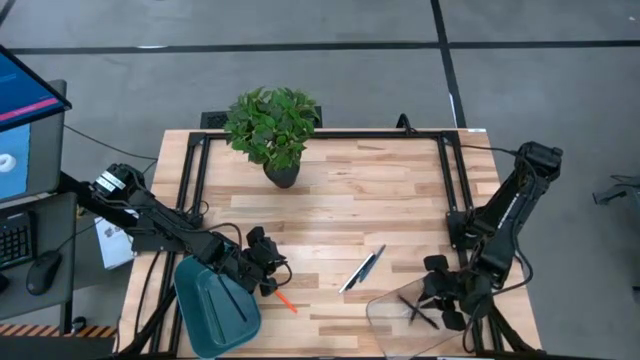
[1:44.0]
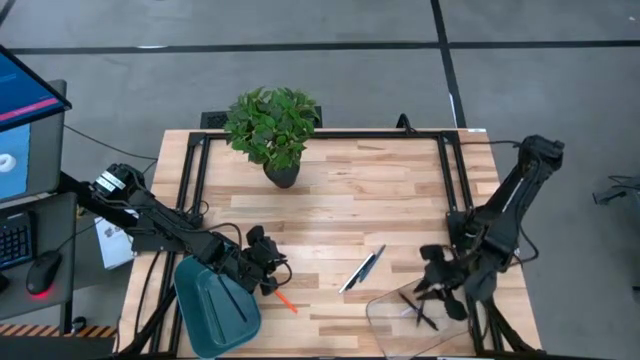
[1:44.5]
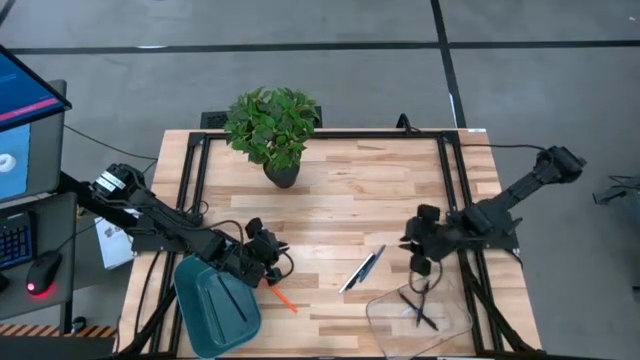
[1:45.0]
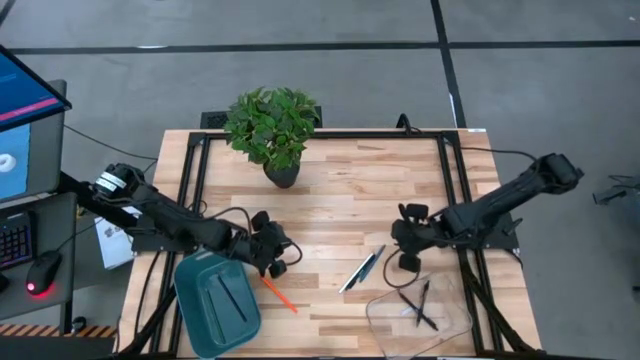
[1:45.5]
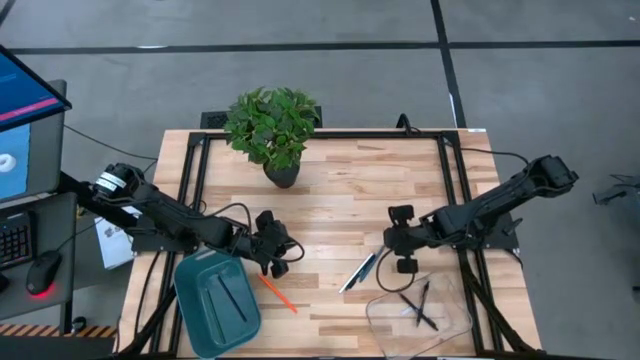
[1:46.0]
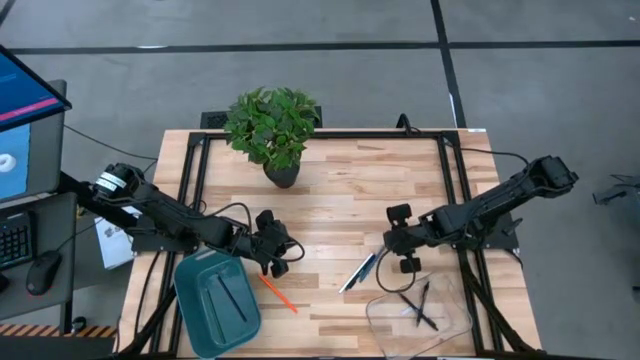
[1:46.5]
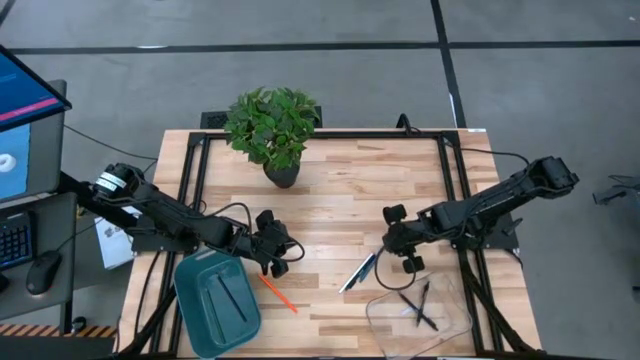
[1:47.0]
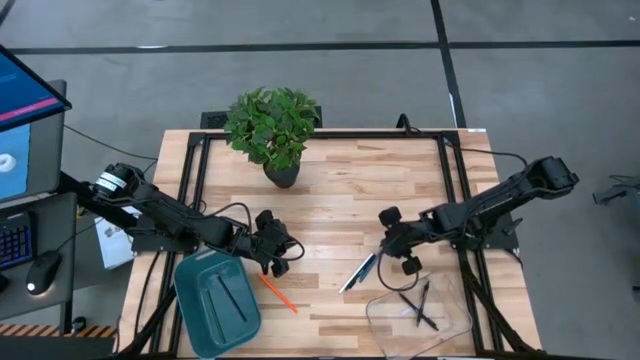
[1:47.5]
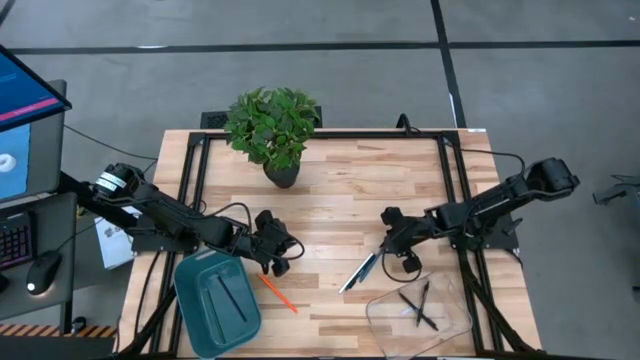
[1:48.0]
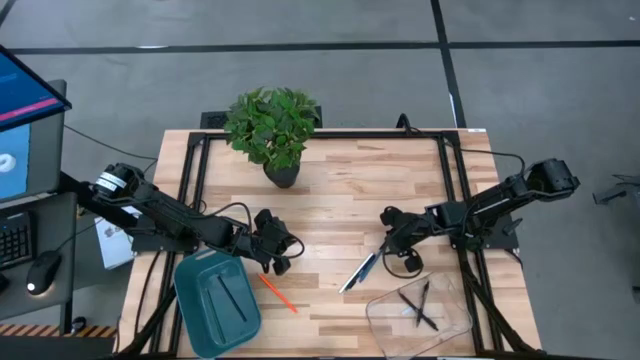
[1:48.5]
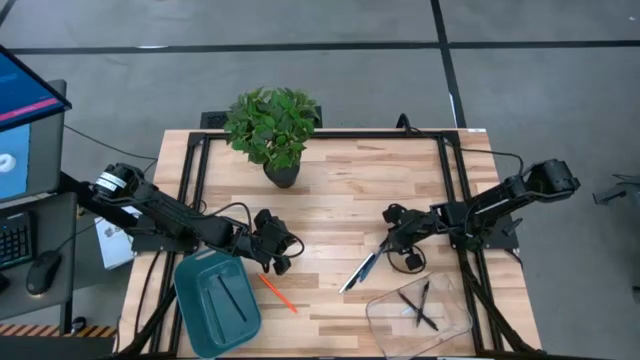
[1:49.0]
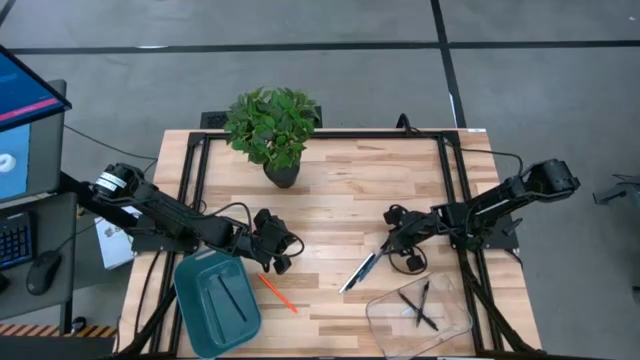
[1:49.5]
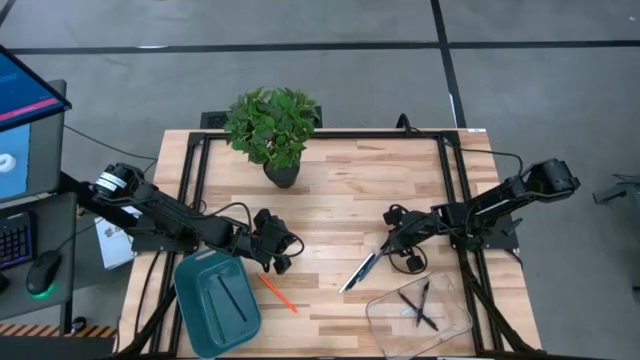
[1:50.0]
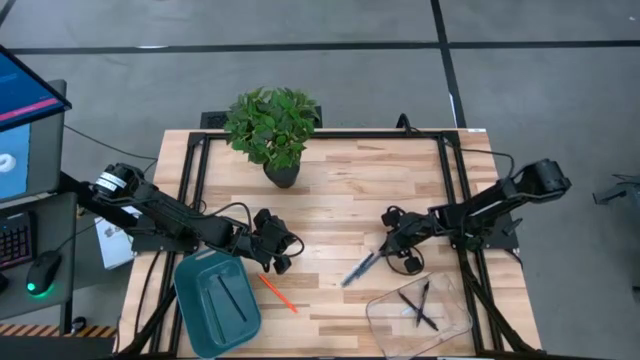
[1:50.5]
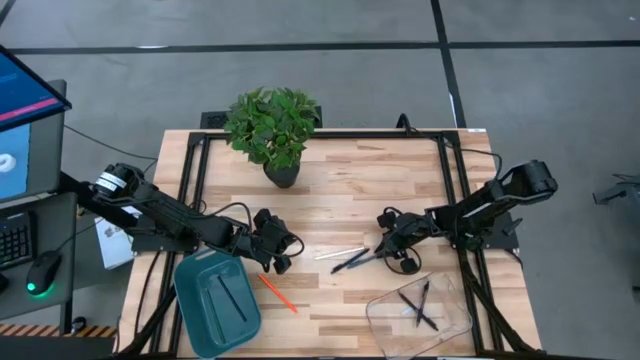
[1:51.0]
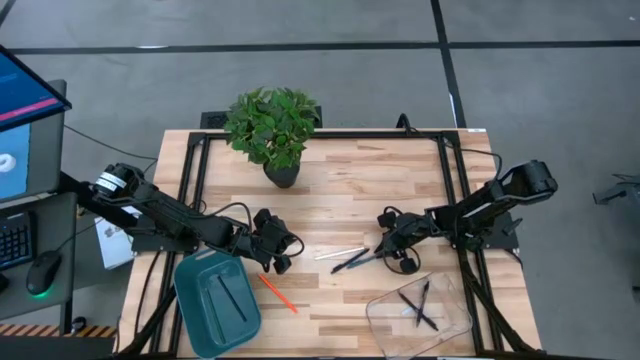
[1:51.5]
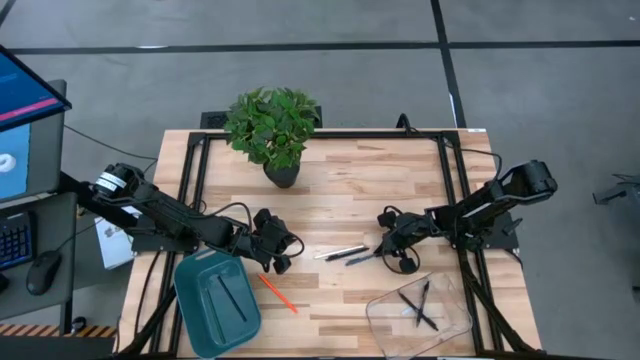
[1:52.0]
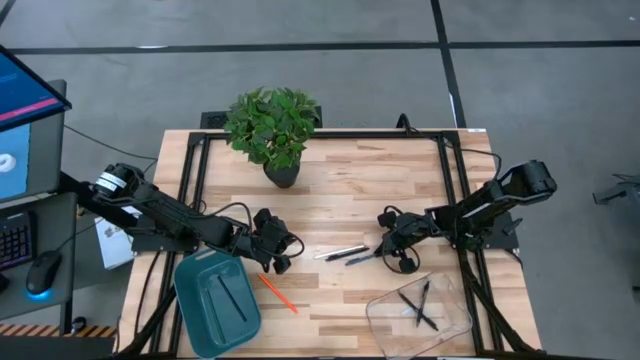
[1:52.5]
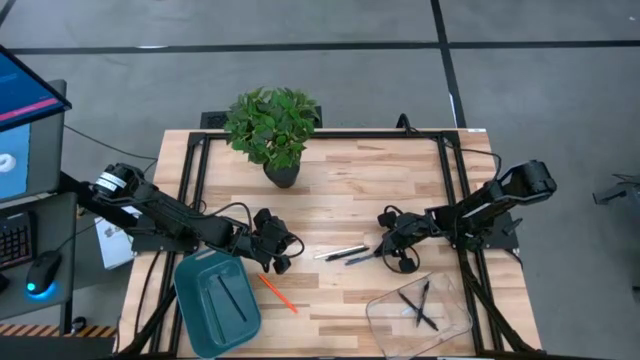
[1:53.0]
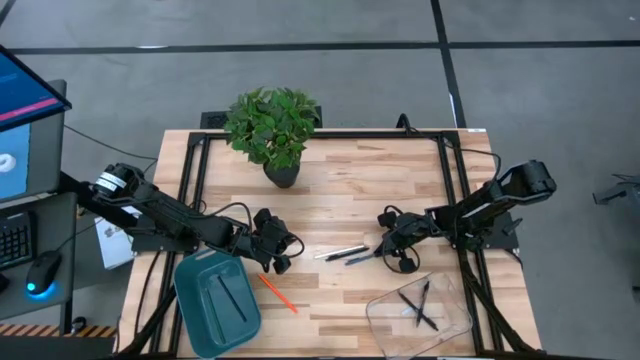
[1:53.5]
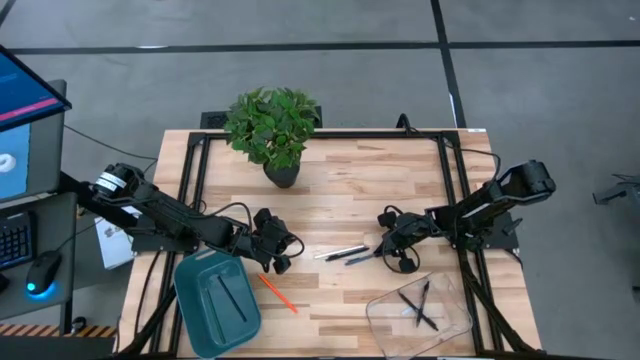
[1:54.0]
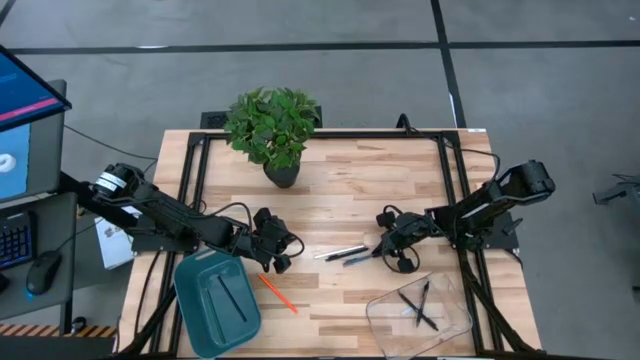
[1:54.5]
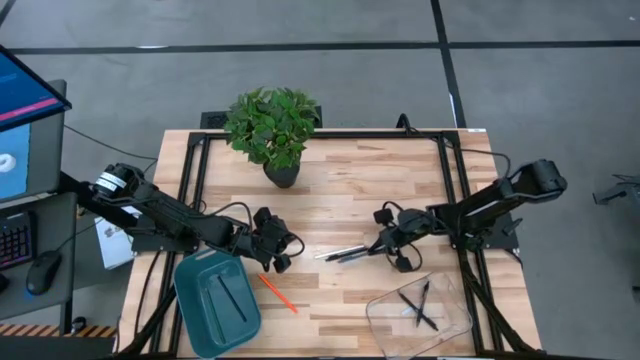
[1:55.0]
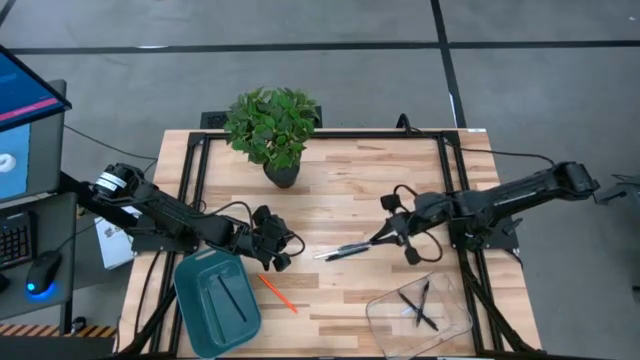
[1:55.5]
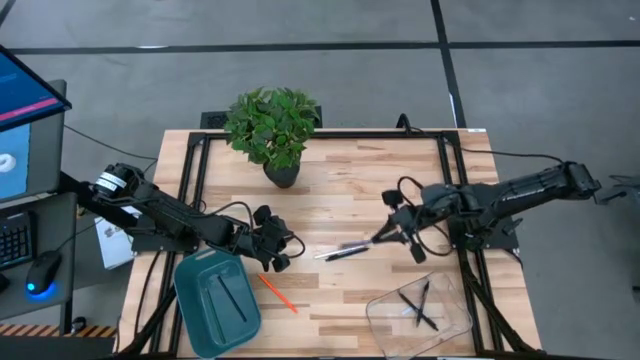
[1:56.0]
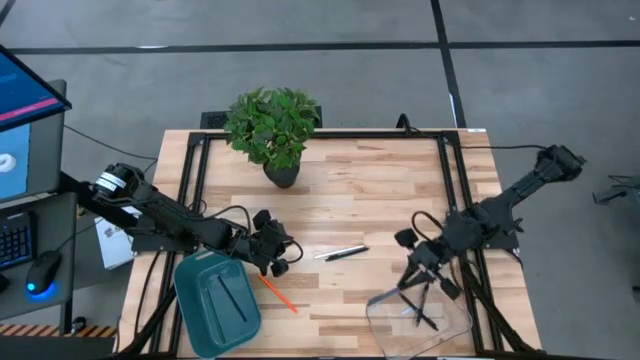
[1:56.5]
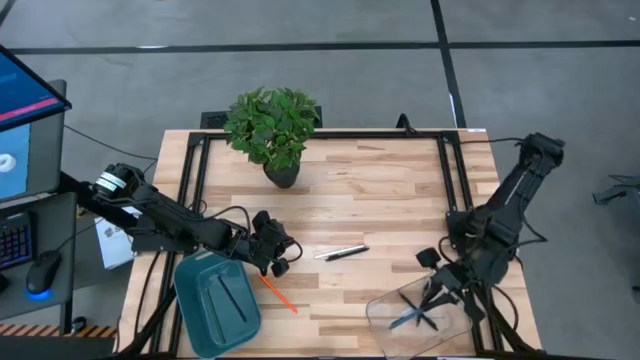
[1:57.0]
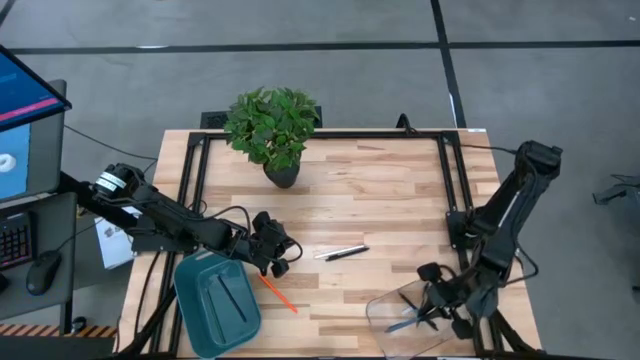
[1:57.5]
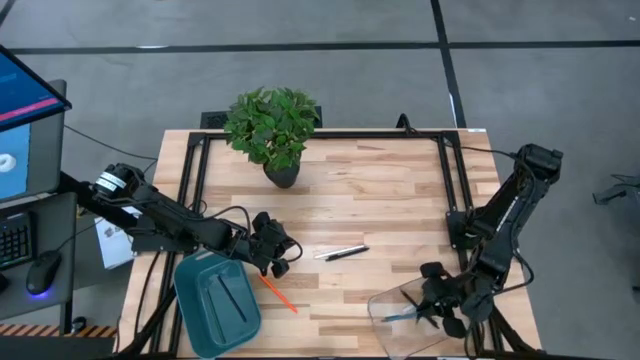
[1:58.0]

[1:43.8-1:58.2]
Task: Sort pens & pencils
Put the blue pen into the transparent bin

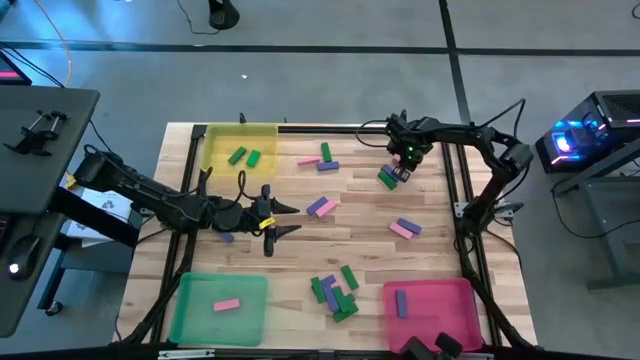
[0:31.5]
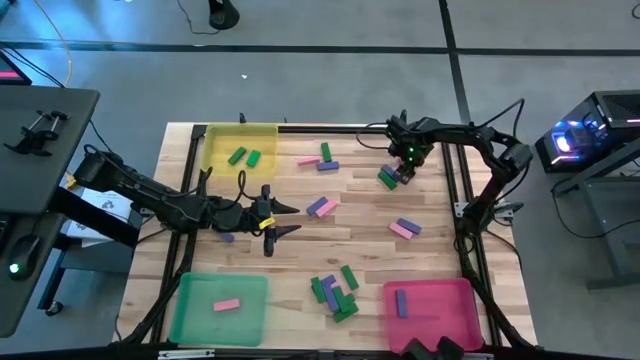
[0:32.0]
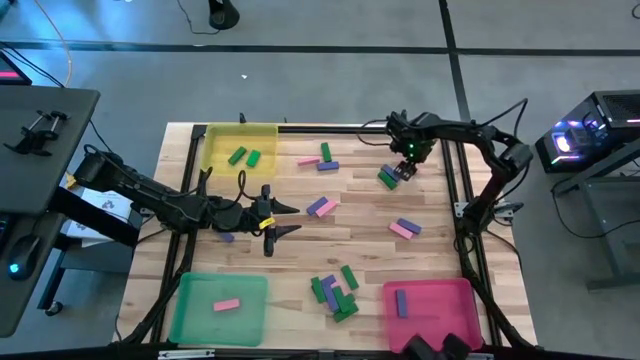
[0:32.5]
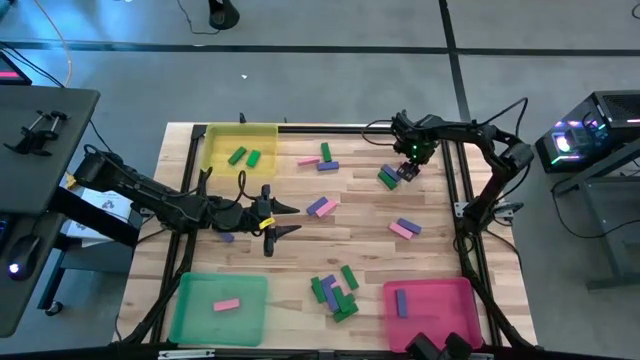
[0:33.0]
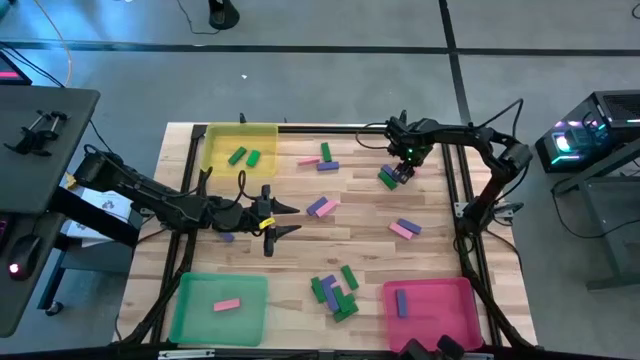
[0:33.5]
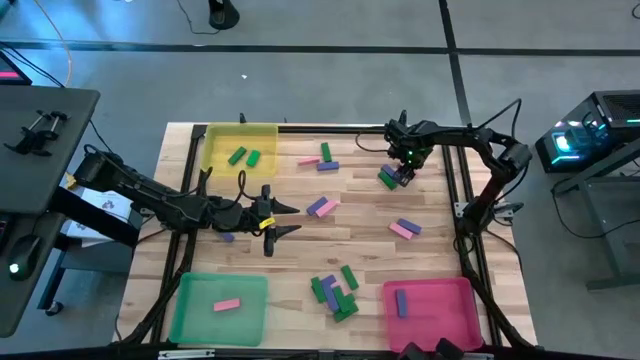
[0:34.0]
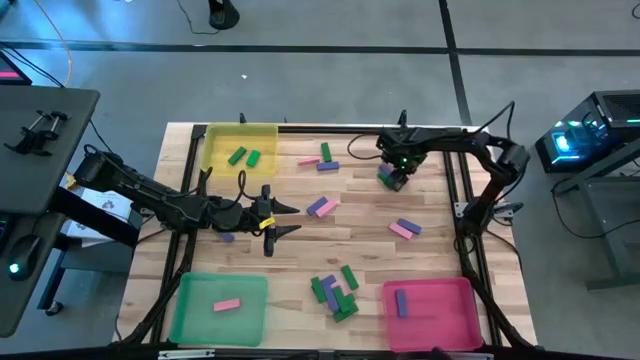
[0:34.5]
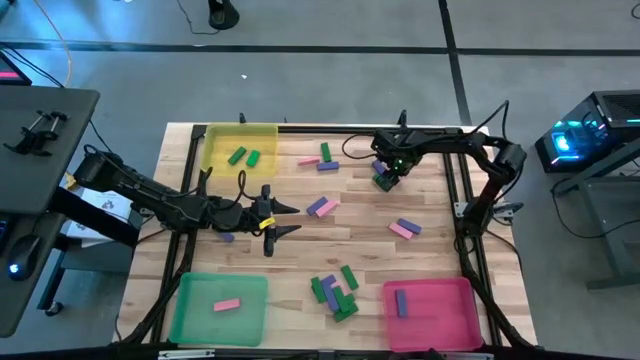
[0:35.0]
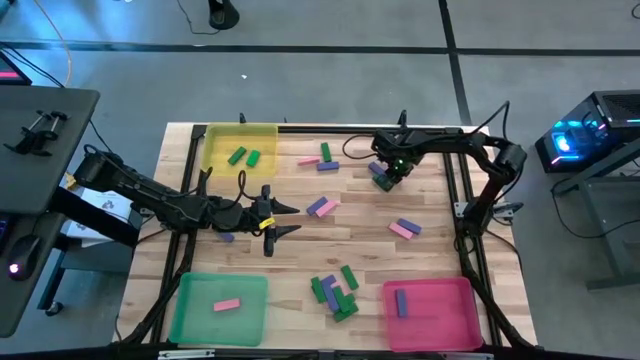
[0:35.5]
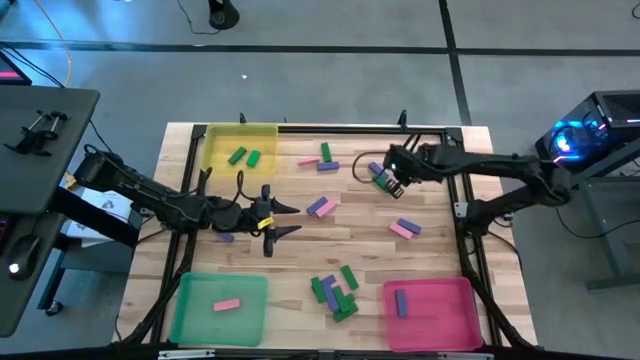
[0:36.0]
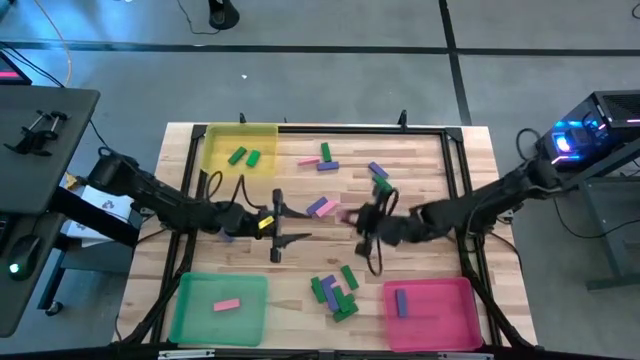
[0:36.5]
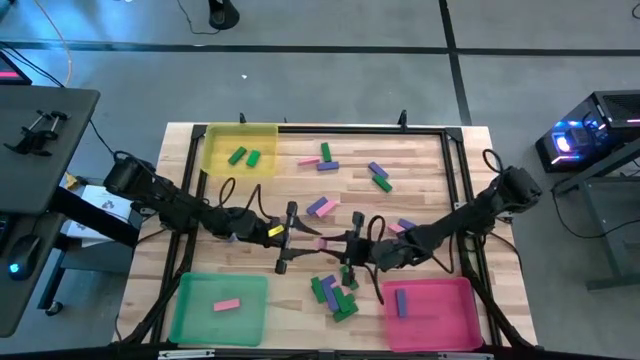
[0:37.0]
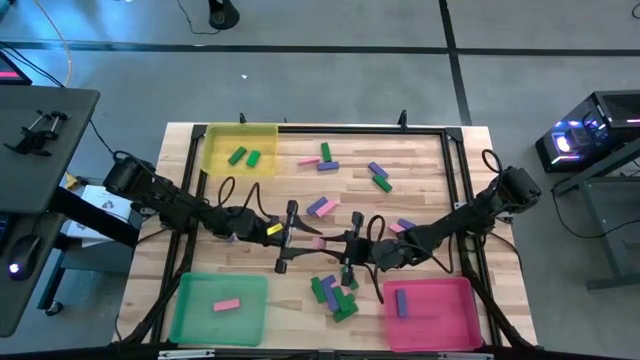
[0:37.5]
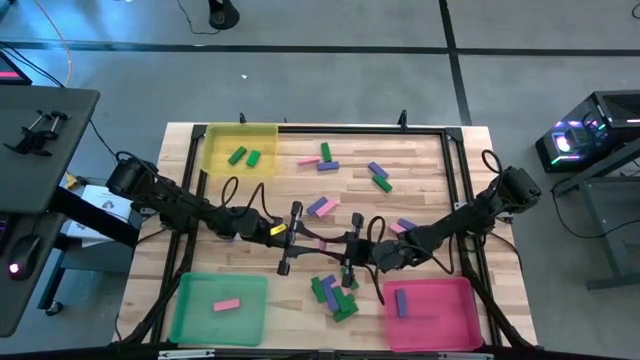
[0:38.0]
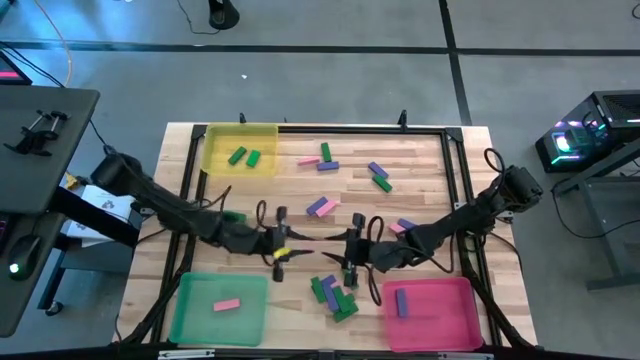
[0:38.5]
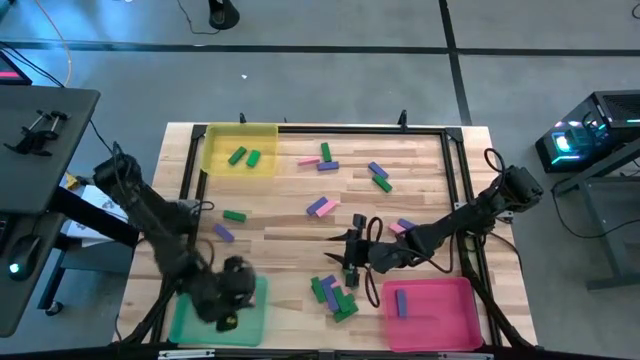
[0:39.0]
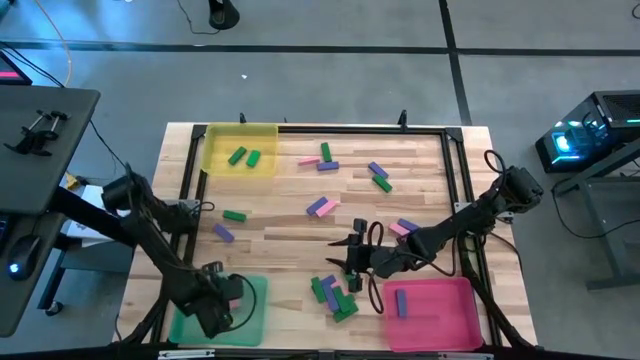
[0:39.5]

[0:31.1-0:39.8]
Task: Sort blocks
Put the pink block into the green bin
